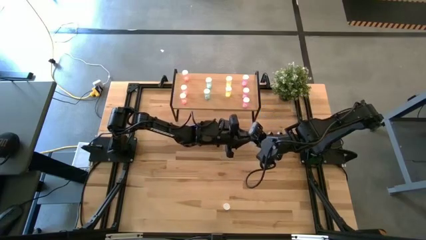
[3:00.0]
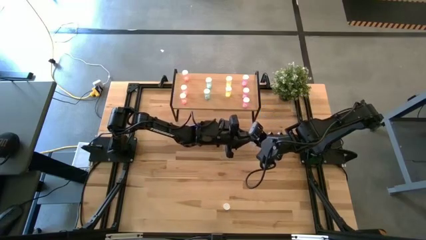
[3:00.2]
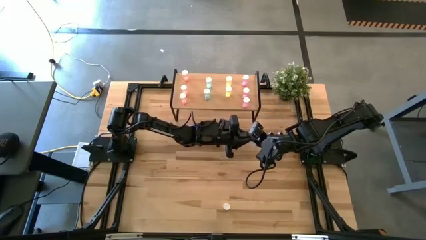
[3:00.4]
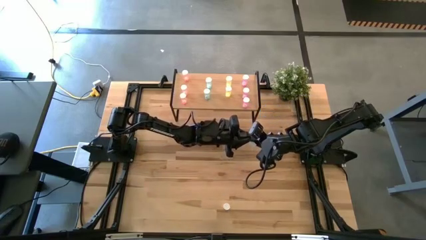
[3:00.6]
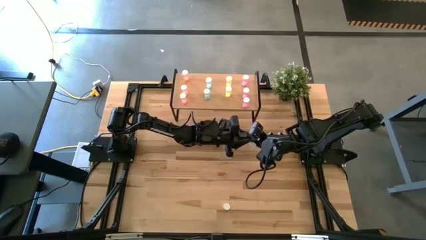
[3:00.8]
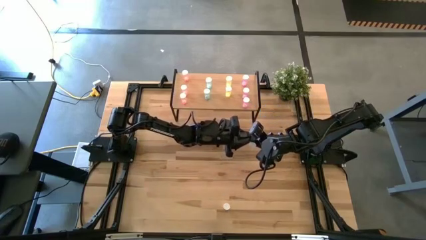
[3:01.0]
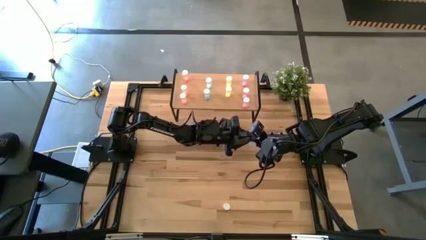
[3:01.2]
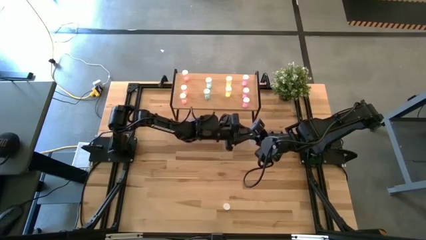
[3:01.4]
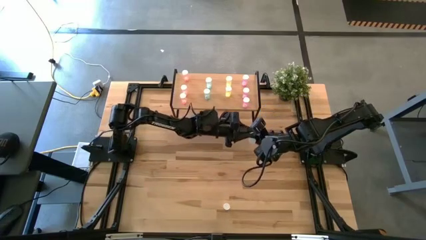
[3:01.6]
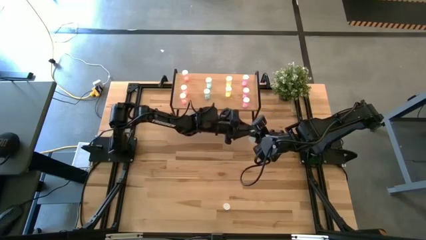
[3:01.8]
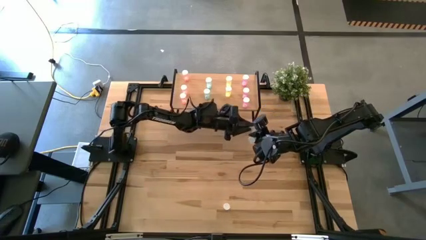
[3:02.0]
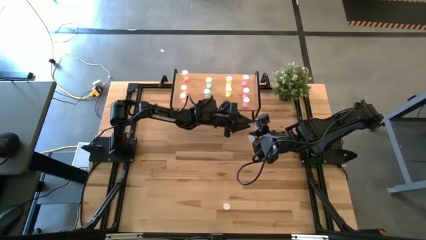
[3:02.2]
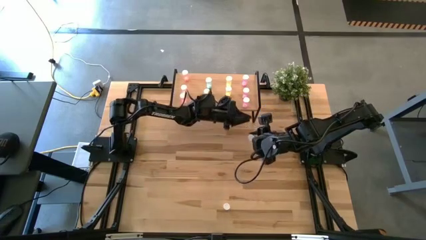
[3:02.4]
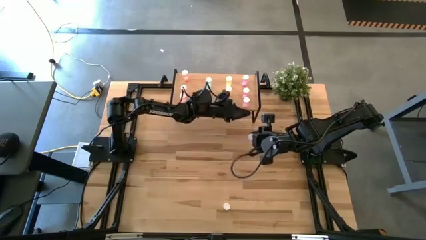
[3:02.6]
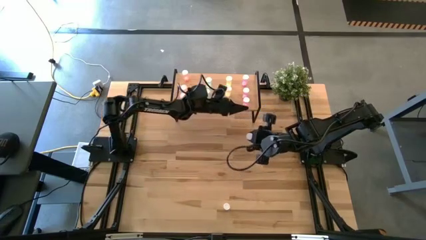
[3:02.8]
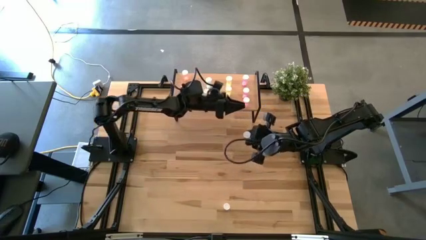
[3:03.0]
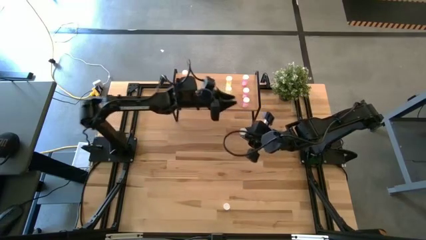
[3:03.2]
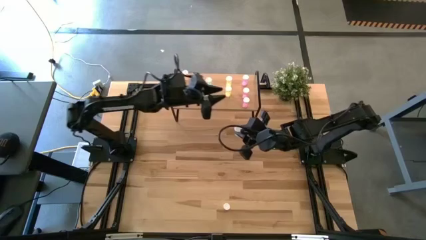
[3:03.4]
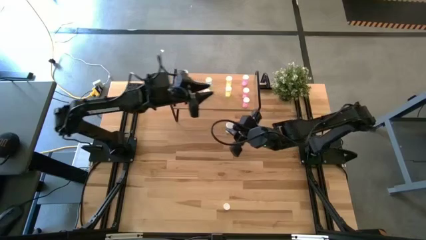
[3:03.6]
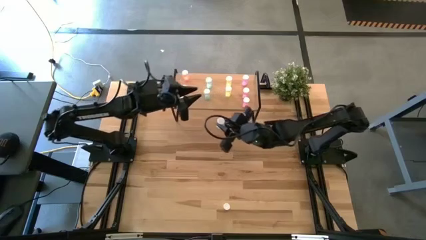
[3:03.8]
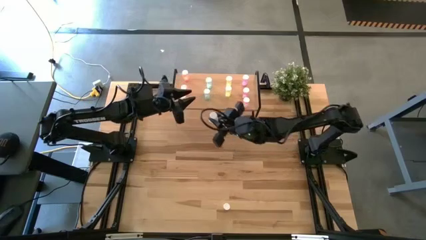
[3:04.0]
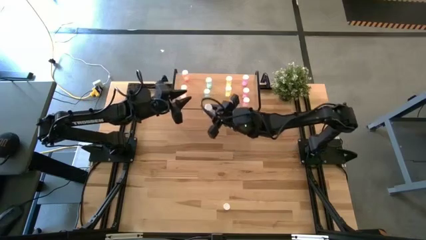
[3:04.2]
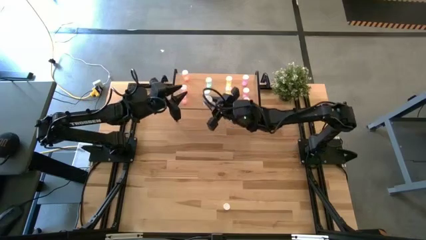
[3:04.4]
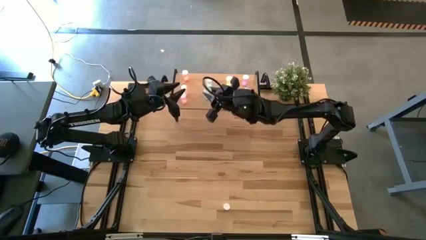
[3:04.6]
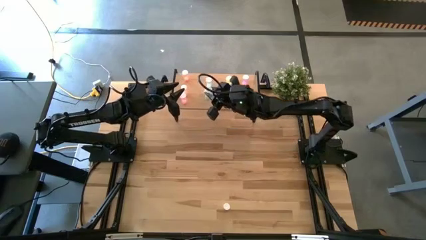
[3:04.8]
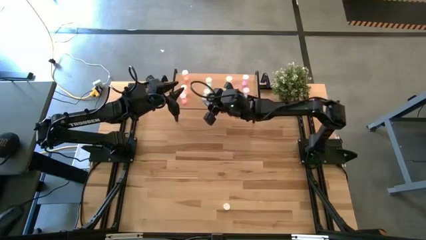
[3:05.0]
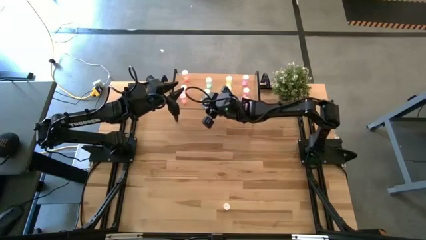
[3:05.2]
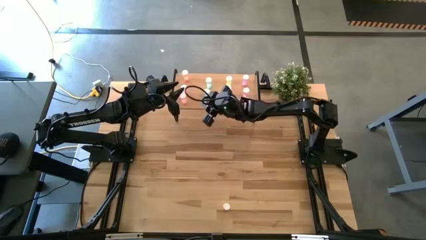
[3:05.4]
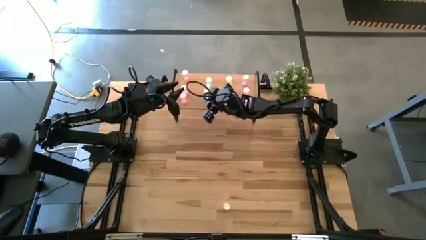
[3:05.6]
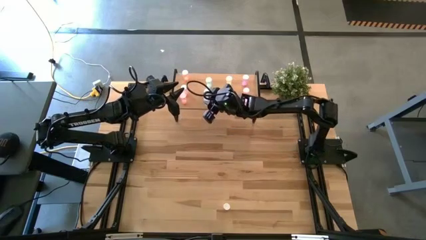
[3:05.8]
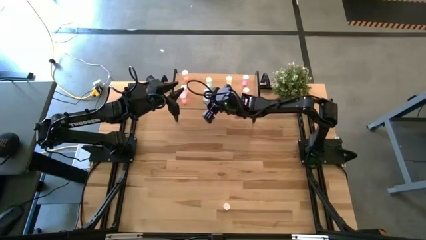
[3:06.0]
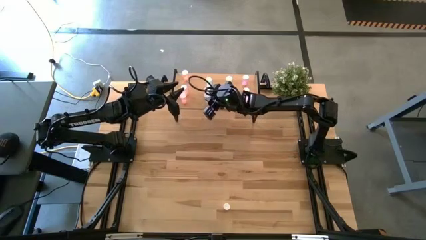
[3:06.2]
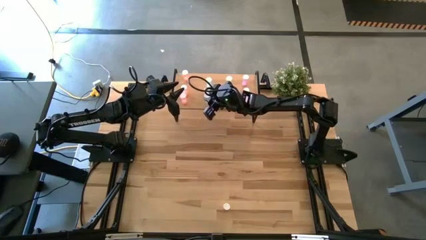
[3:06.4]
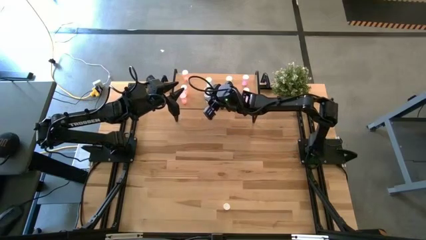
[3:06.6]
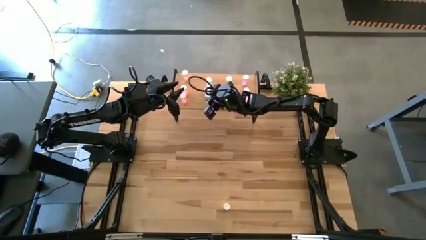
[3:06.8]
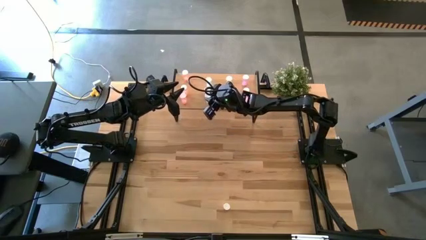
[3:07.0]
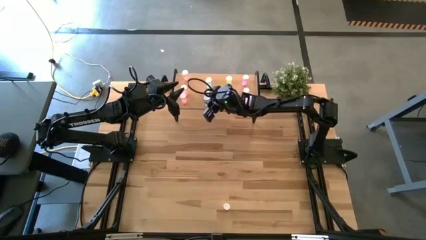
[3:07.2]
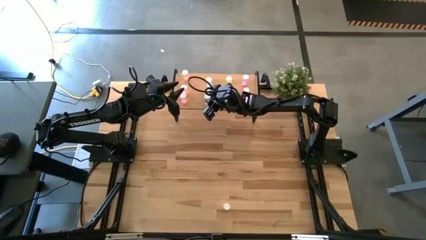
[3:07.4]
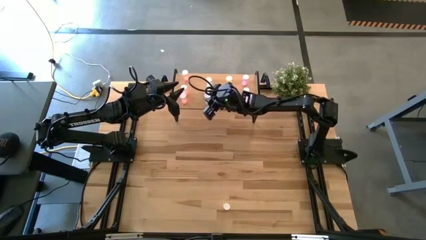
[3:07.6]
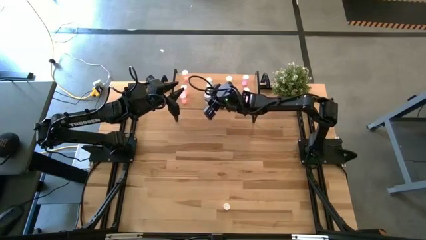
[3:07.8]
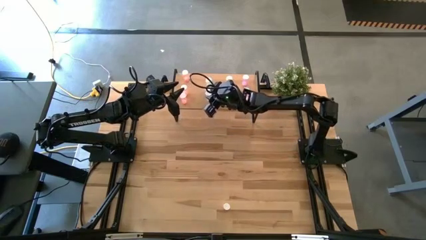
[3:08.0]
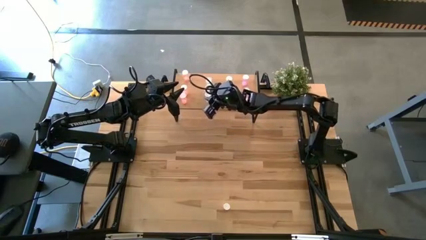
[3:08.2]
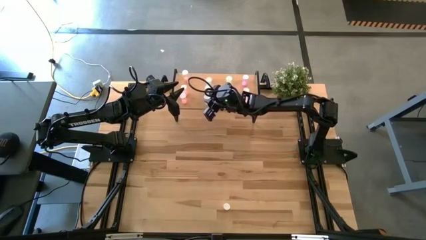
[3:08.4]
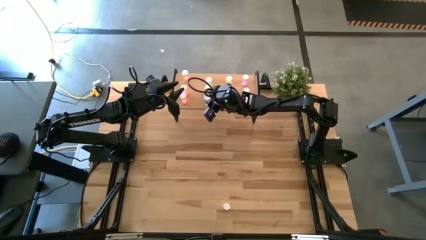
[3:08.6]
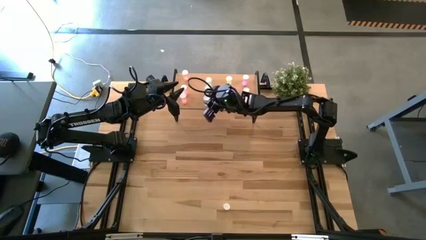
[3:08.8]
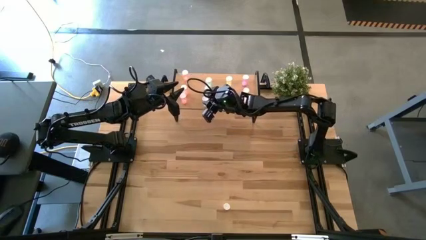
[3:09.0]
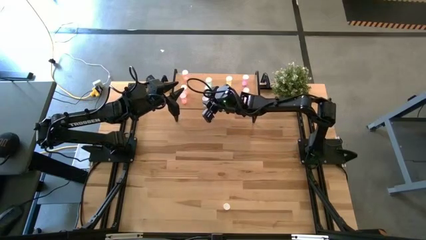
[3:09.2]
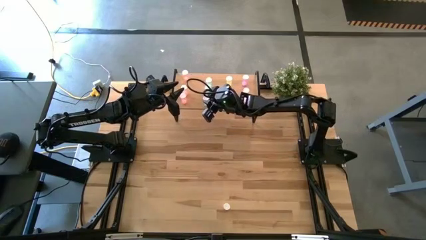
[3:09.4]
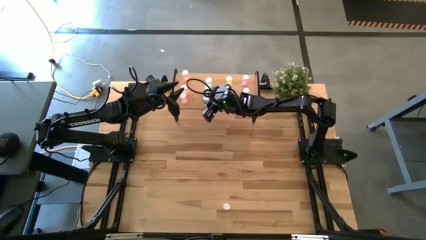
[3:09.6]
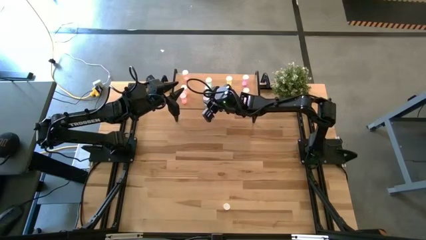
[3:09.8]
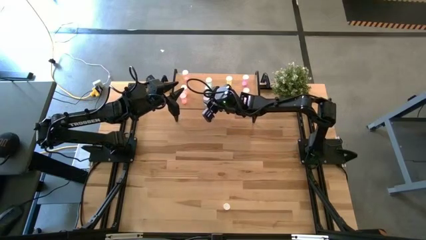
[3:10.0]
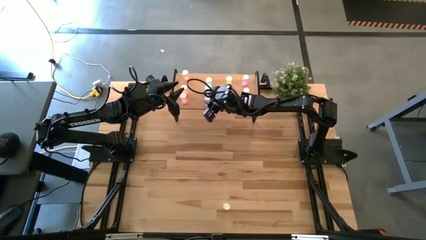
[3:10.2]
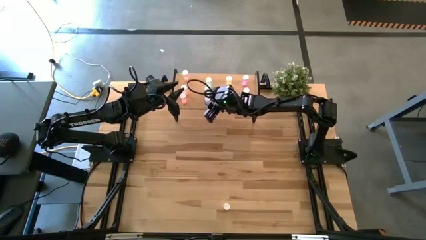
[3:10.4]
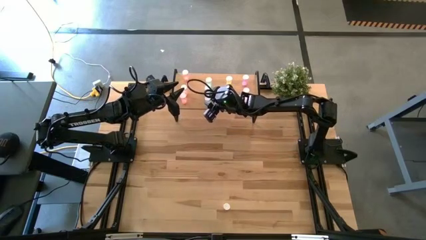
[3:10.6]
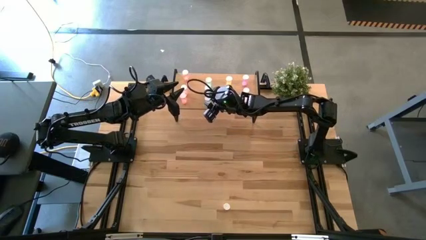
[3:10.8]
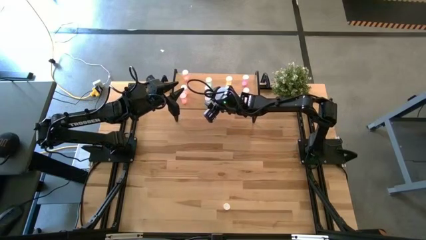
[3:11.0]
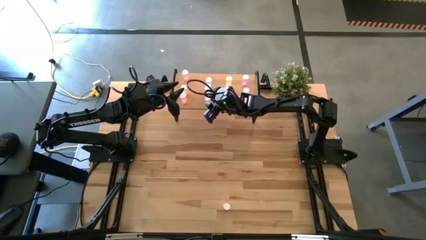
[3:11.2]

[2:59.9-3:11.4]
Task: Pick and place medicine bottles onto shelf by color
Put the blue pill bottle on the shelf aligned with the other blue pill bottle
